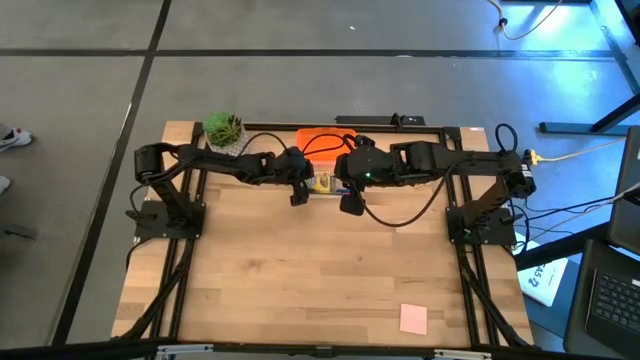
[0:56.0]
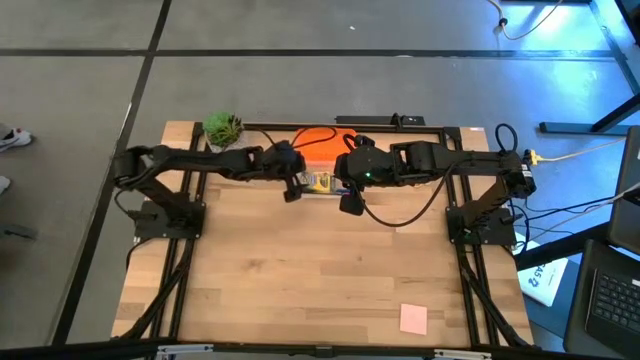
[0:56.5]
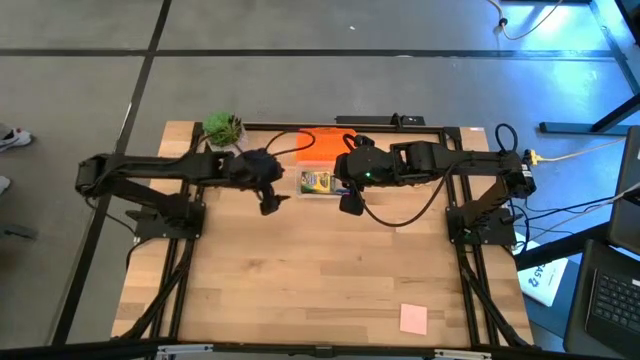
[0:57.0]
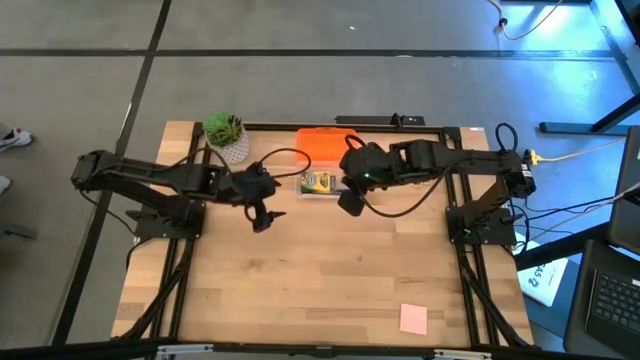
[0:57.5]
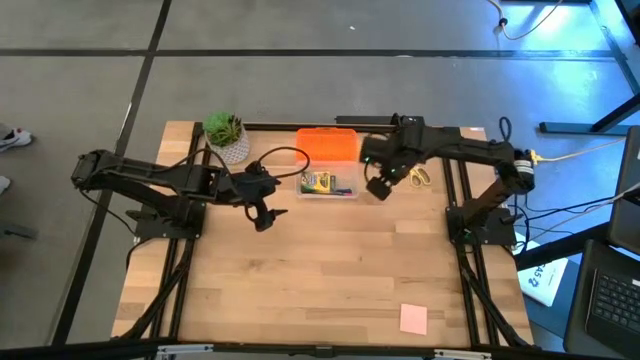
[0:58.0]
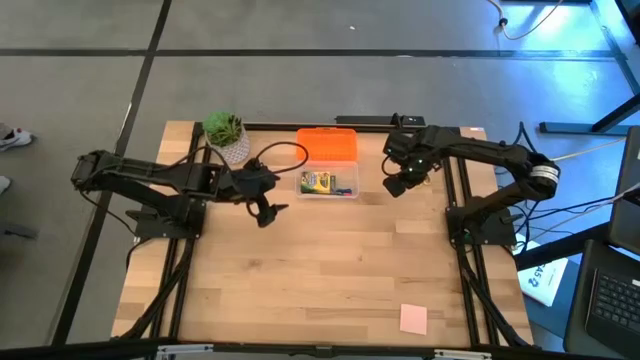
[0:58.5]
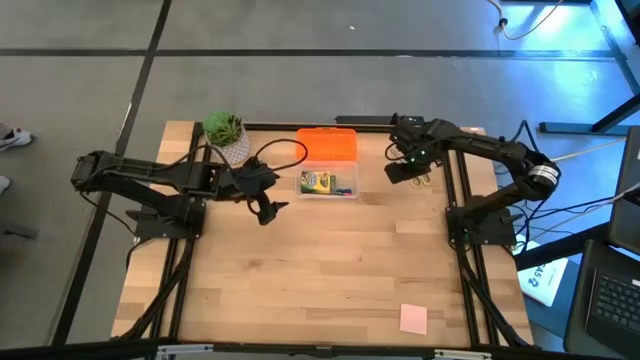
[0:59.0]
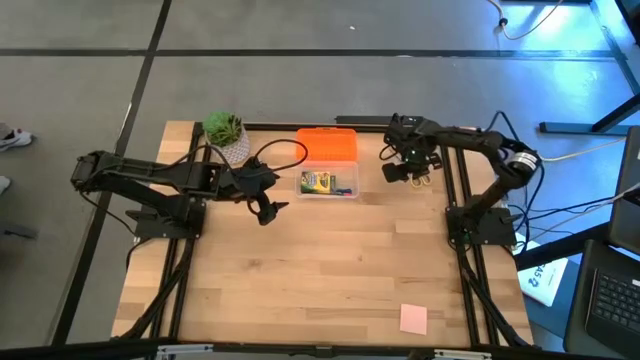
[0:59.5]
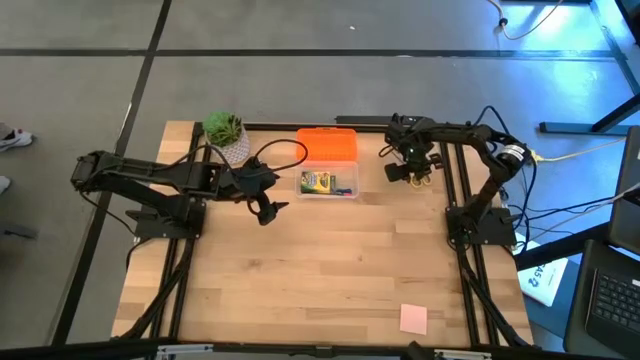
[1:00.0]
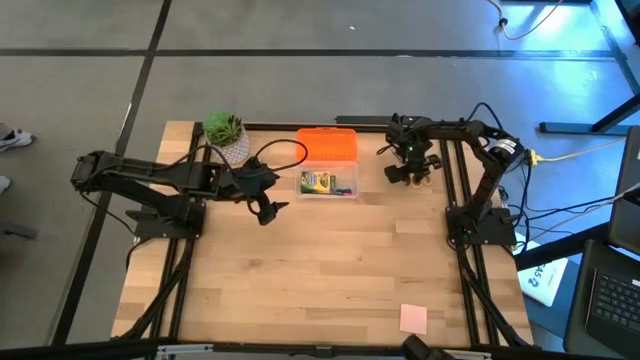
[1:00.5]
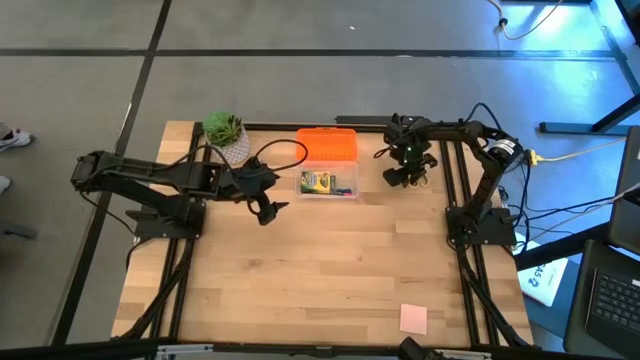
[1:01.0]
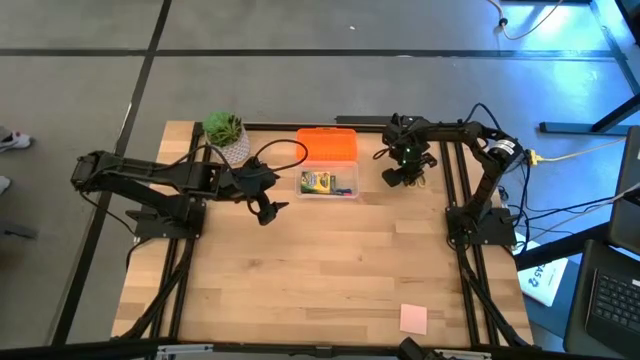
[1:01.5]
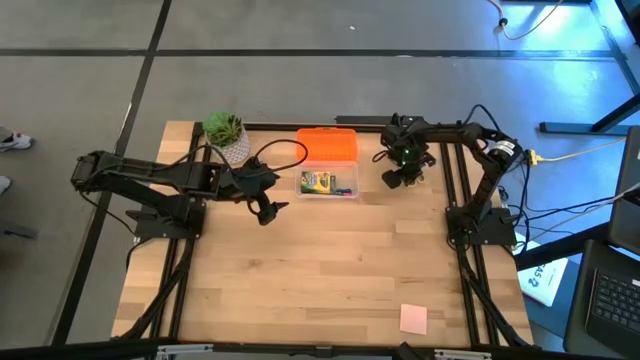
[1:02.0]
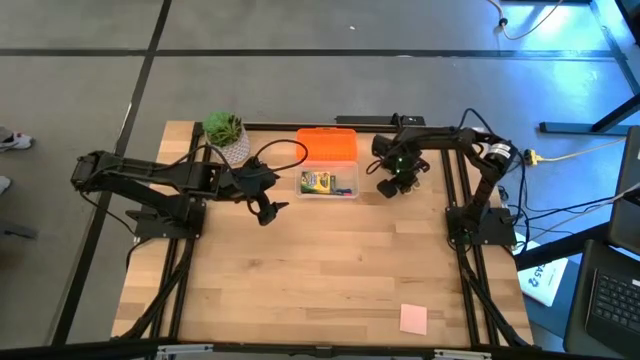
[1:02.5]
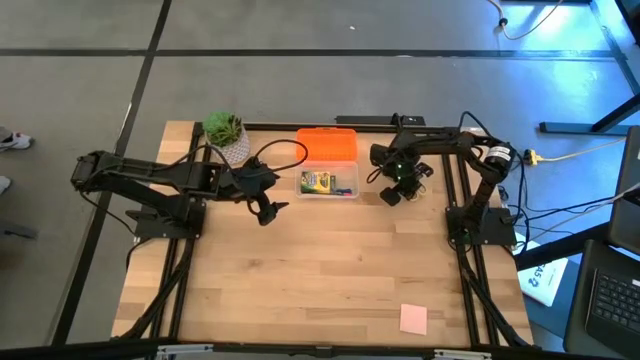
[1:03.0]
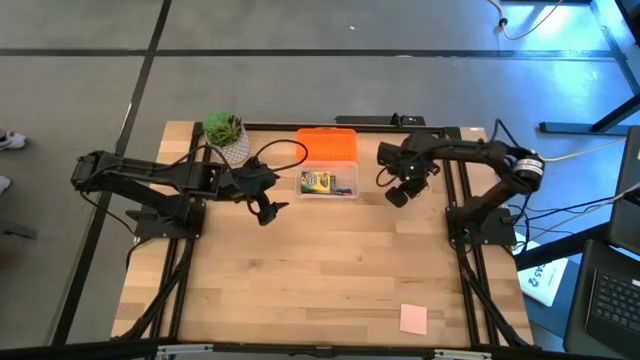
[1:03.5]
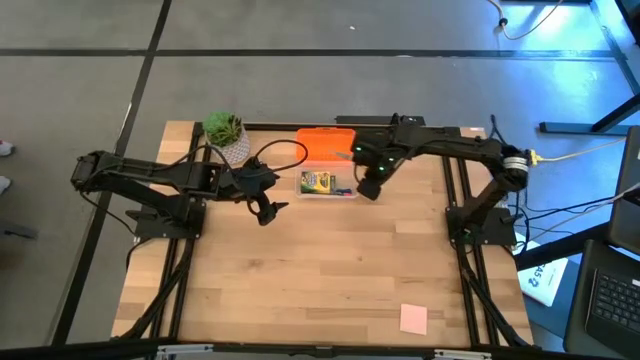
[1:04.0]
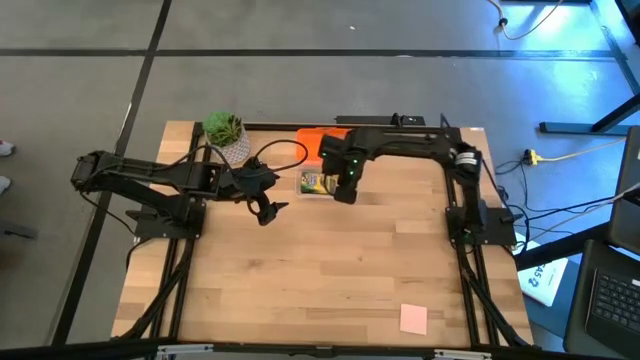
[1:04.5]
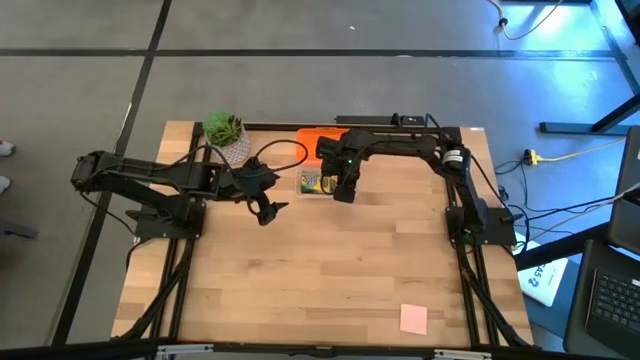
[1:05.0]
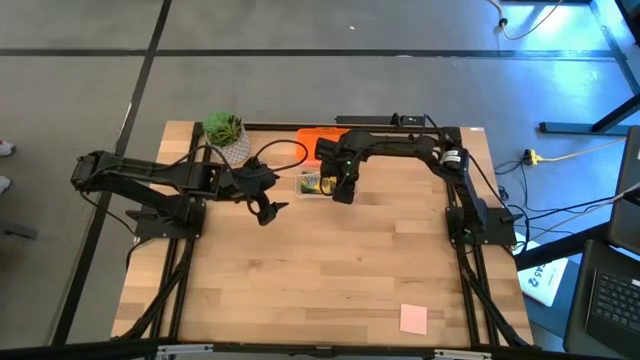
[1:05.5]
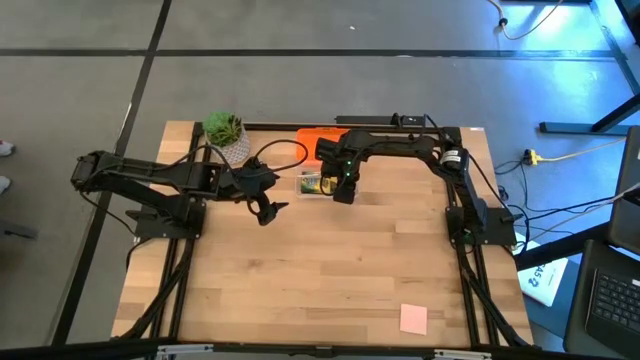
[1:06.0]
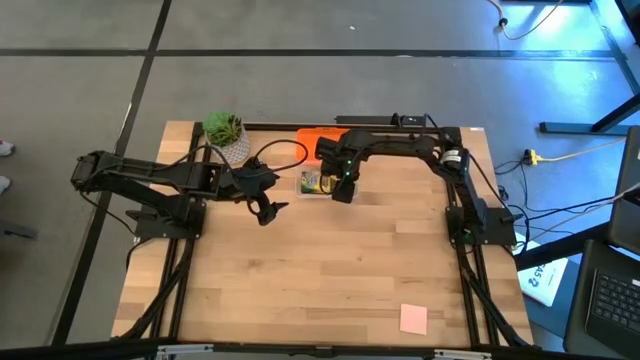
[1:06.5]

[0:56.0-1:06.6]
Task: Pack school essentials
Put the yellow scissors into the orange supply box

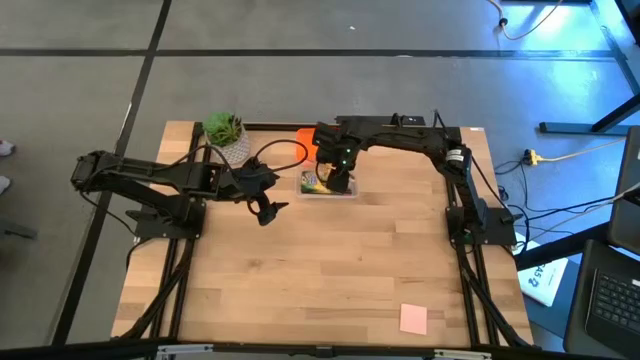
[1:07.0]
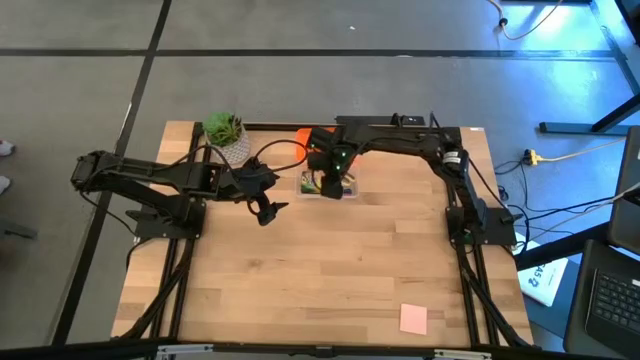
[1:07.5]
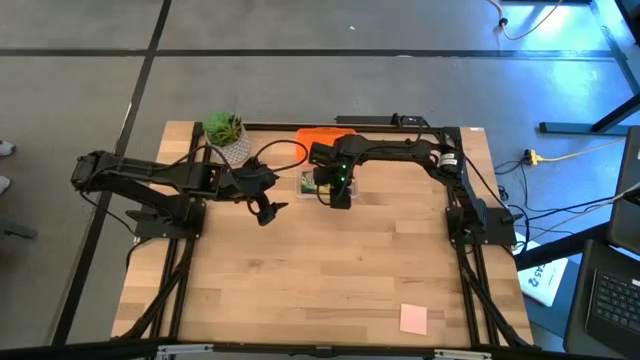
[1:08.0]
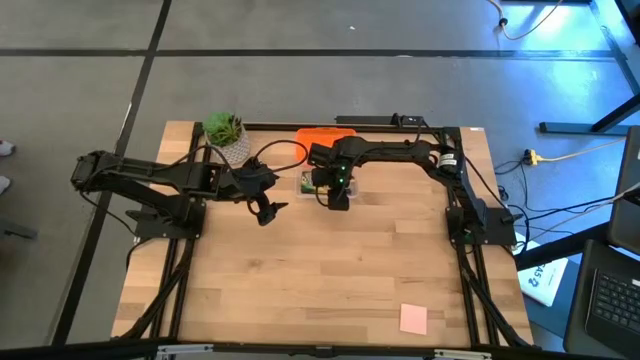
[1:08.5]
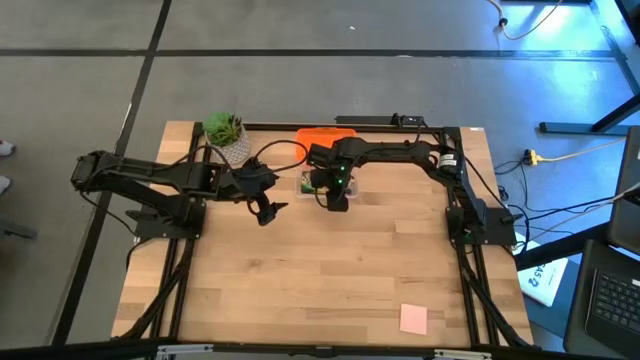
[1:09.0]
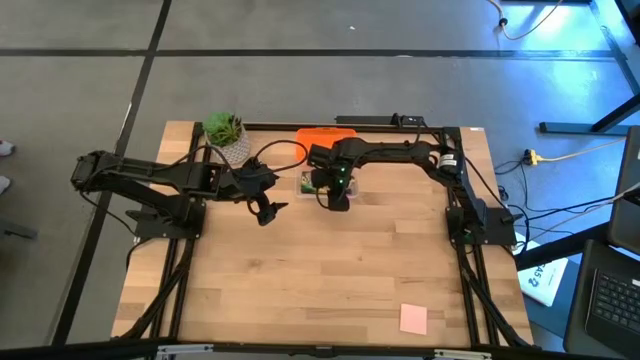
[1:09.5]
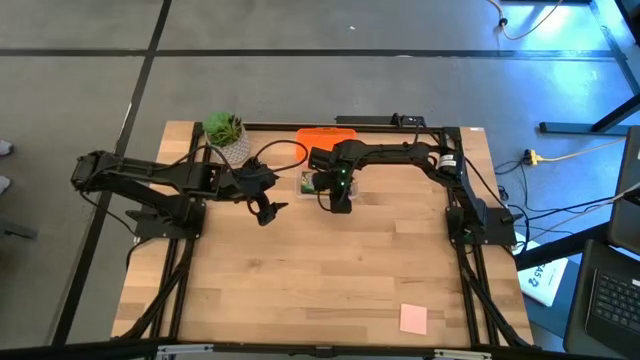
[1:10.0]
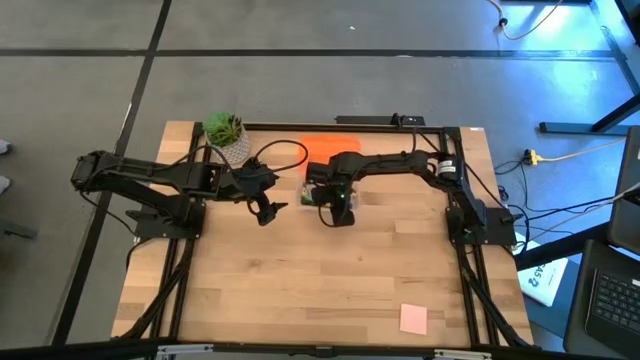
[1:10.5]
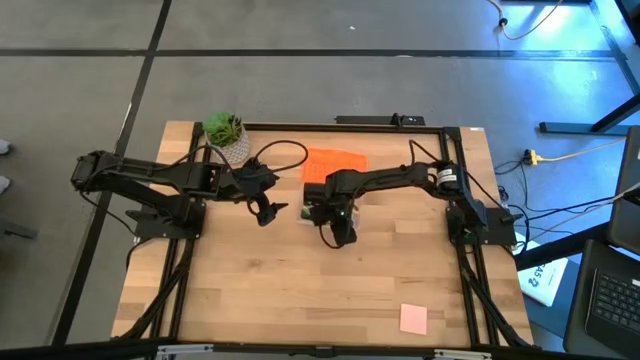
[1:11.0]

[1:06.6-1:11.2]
Adjust the orange supply box

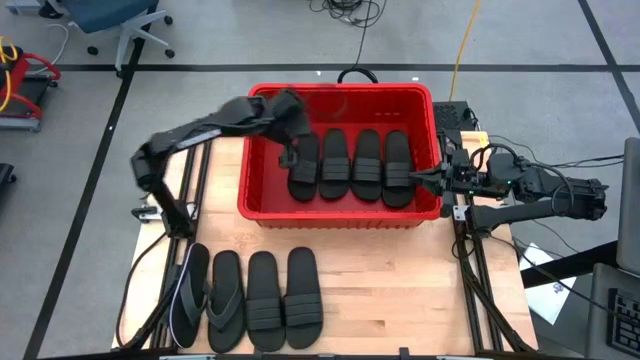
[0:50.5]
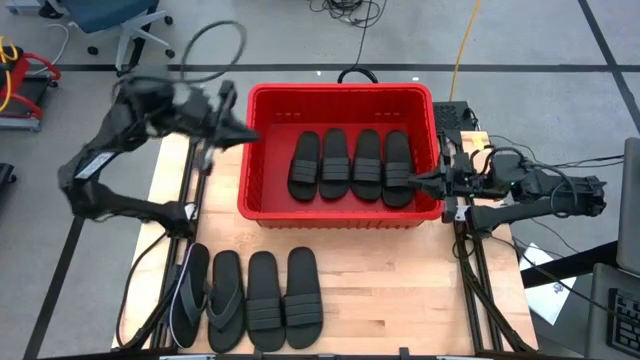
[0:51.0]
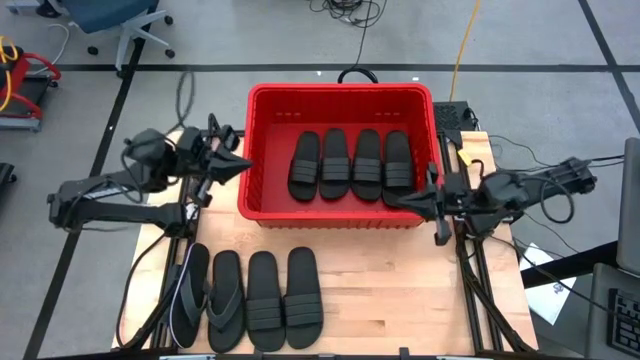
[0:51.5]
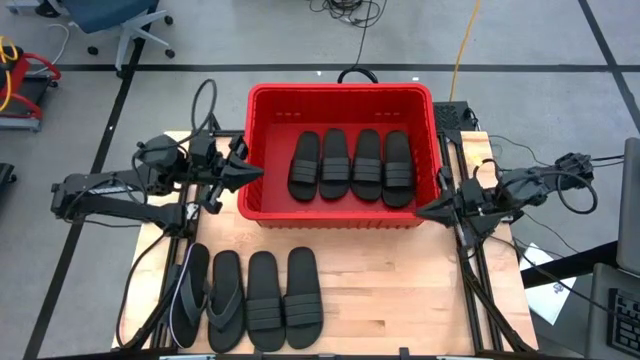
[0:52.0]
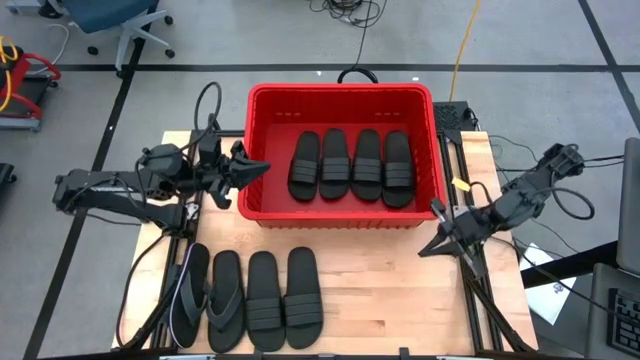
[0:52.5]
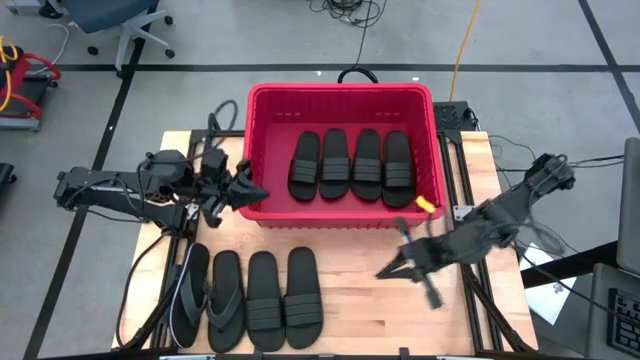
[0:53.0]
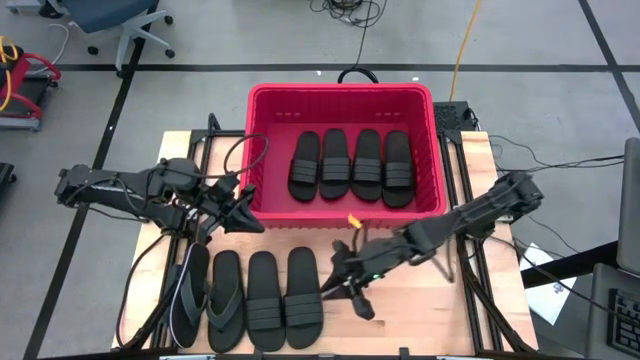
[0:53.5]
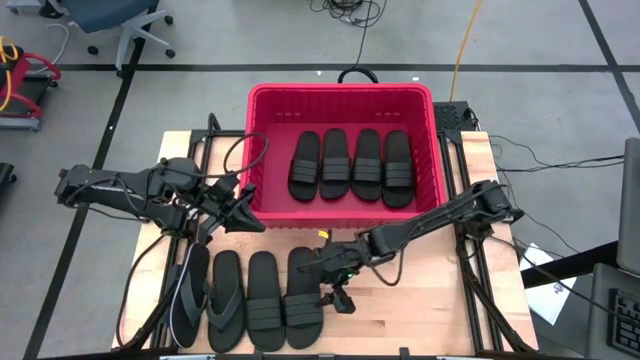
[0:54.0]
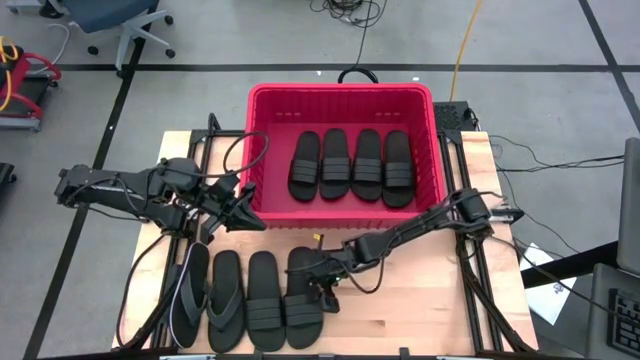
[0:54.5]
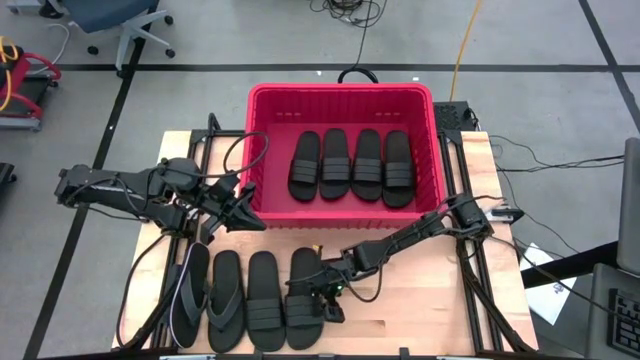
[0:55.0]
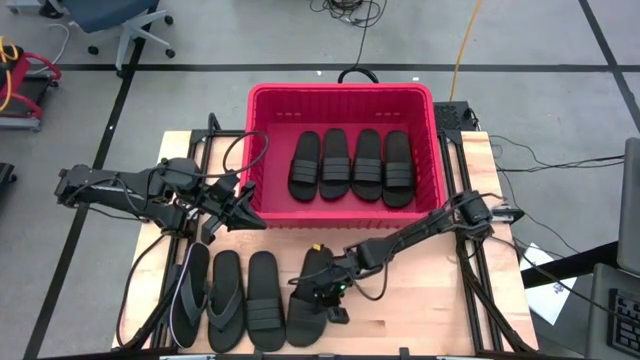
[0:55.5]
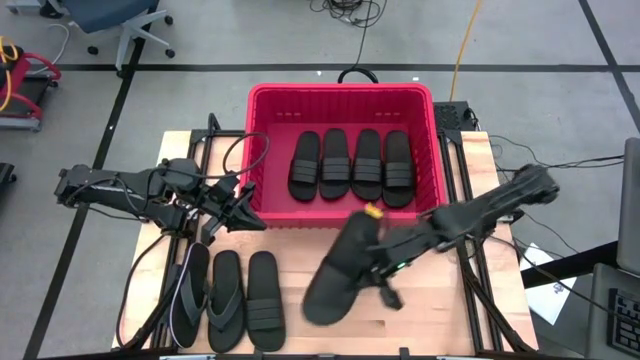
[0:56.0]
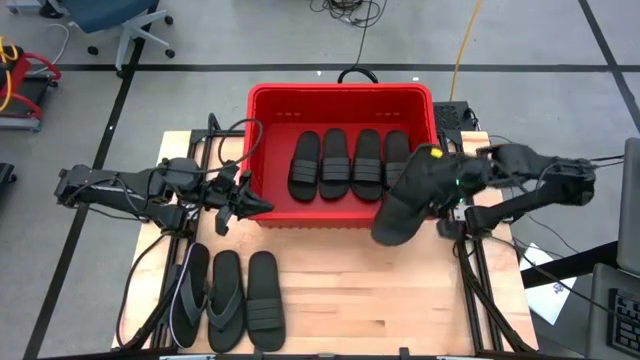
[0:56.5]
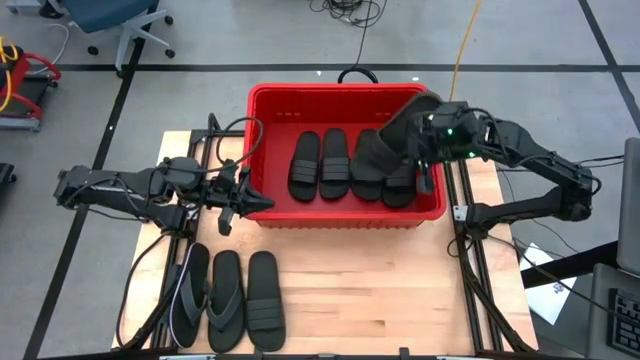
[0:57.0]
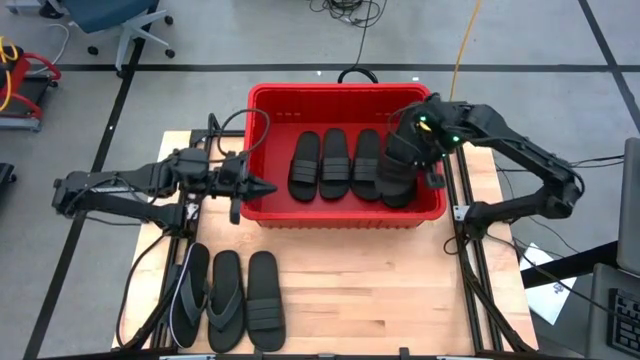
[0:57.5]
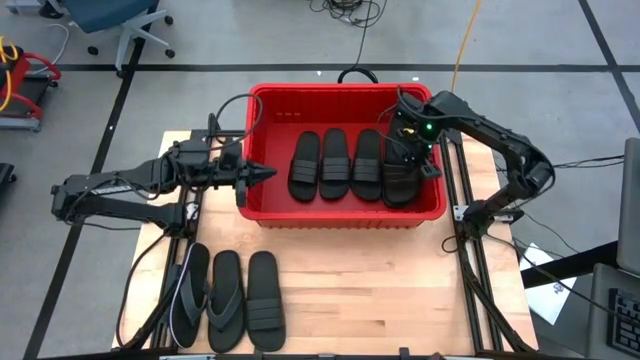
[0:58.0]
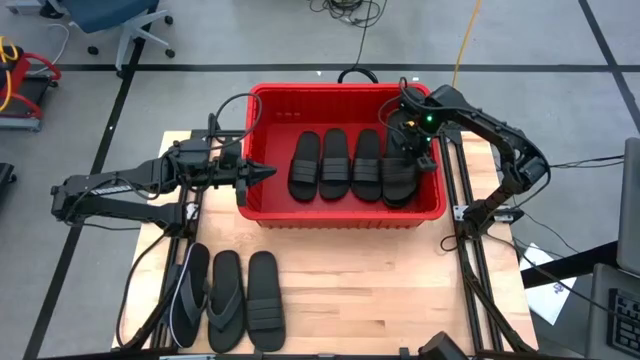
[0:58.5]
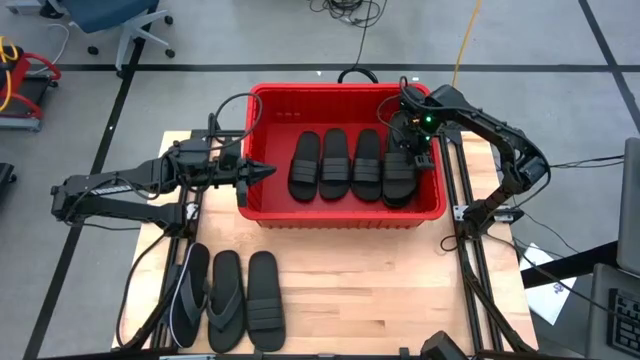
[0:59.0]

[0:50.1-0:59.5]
Task: Pick and place slides into bin
Put the black slide into the red bin
